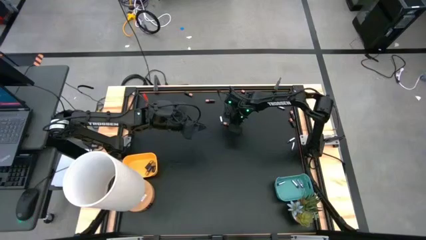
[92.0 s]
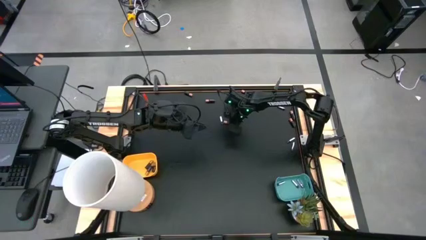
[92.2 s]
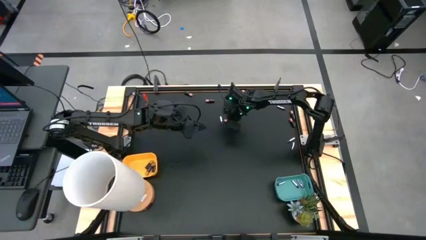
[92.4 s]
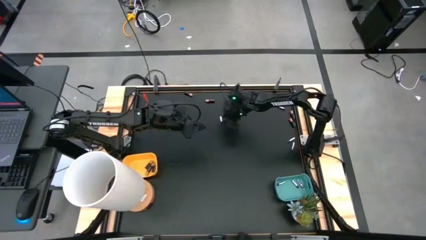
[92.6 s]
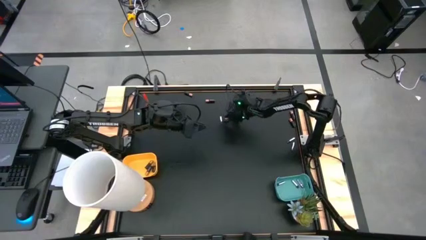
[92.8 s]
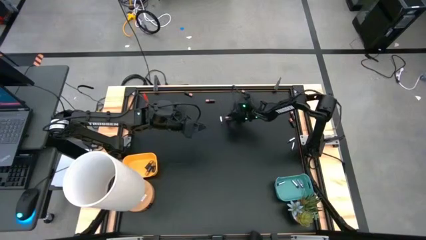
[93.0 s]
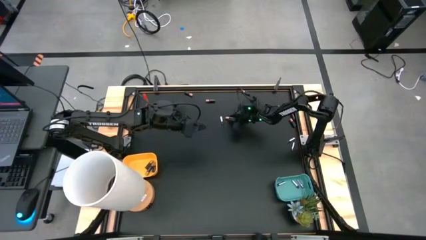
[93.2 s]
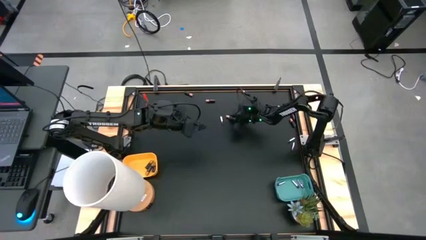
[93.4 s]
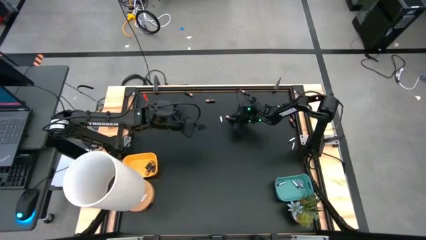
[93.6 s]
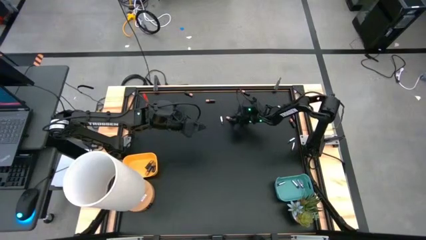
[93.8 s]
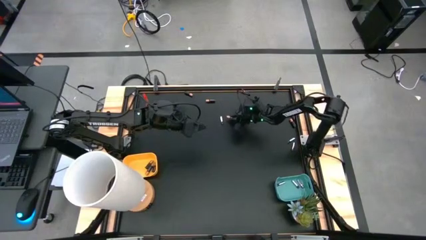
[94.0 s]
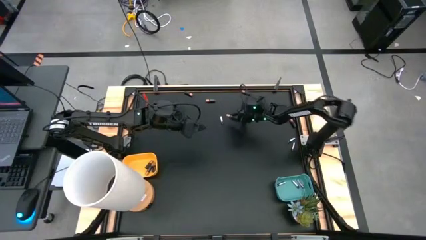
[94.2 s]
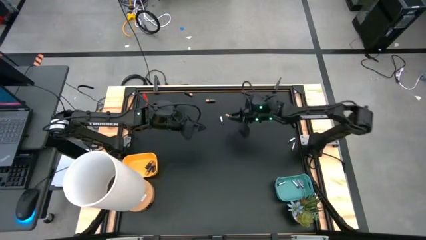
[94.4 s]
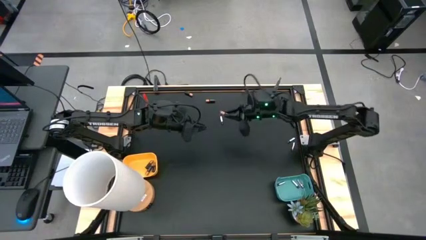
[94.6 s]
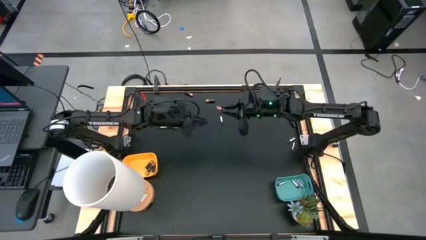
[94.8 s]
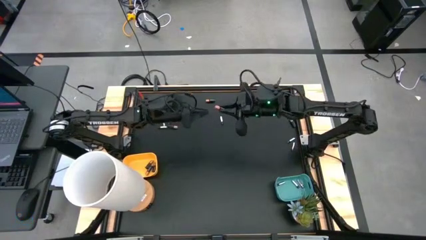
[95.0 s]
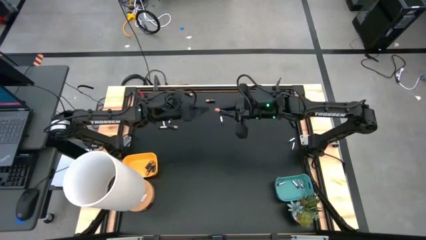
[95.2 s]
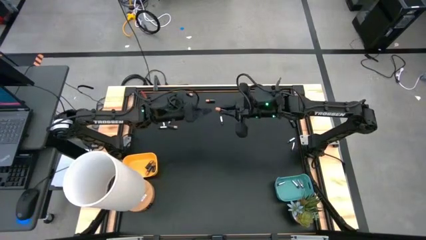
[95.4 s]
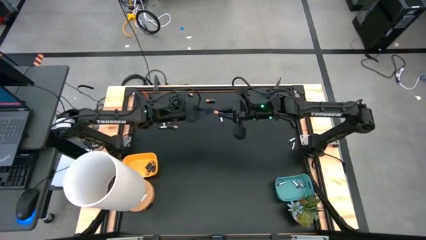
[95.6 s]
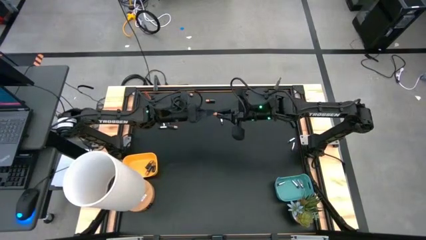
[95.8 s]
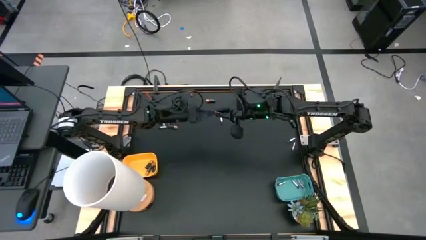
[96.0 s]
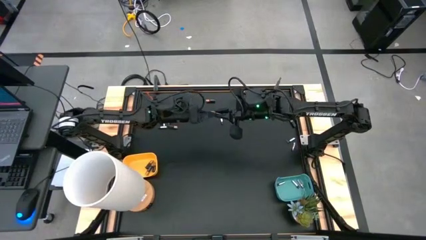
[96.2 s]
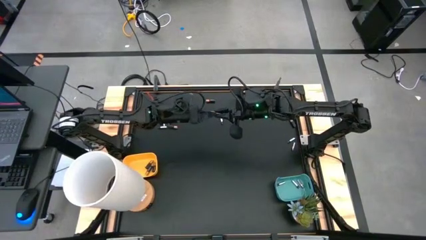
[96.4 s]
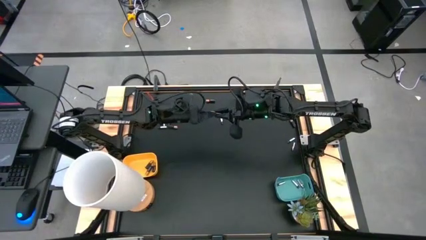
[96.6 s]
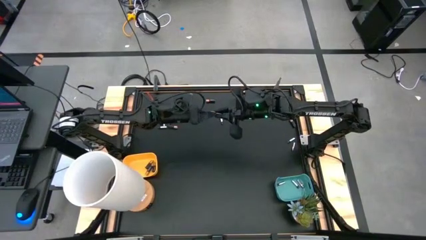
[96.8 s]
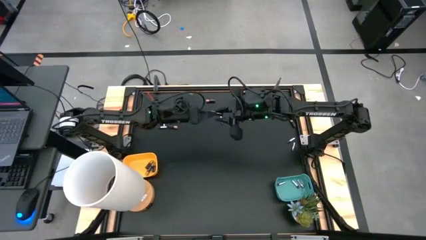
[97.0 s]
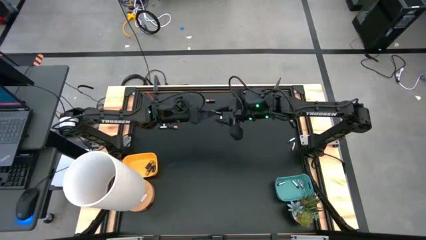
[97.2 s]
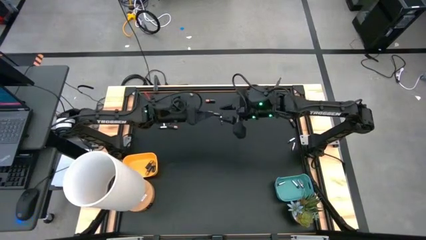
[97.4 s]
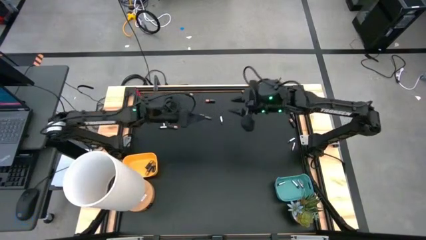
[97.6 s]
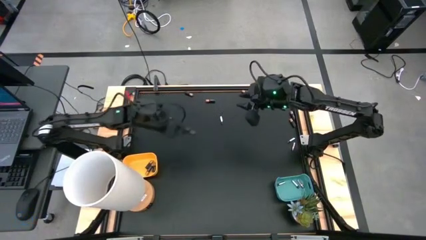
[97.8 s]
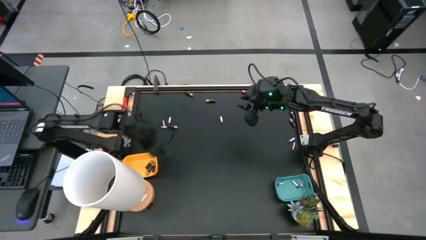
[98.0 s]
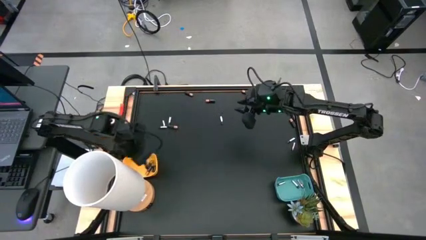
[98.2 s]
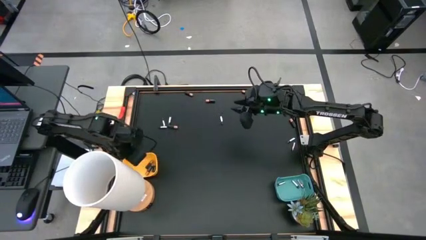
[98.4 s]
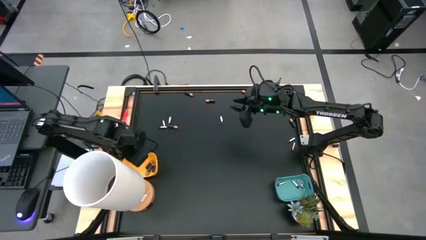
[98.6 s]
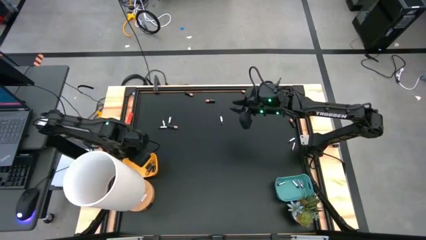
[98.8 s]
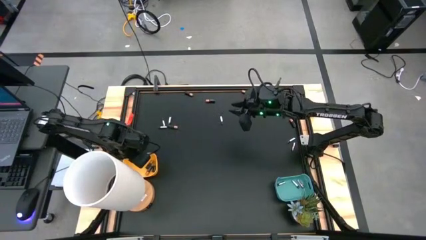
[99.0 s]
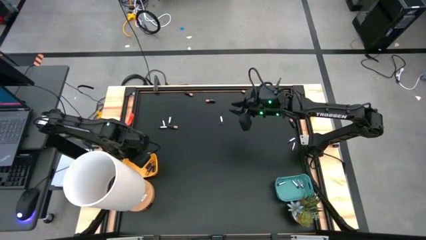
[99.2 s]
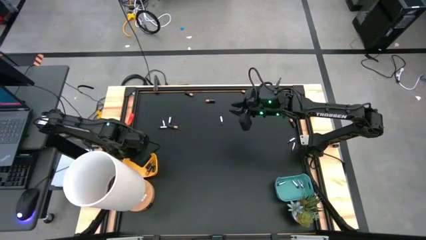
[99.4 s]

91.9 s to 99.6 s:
Task: Sort batteries
Put the black battery into the yellow bin

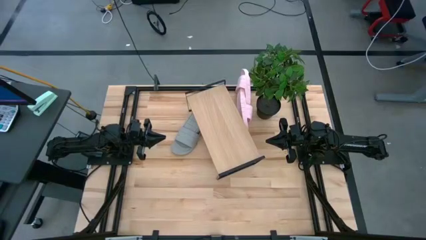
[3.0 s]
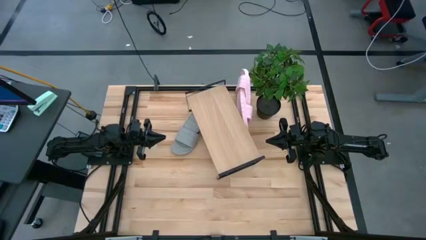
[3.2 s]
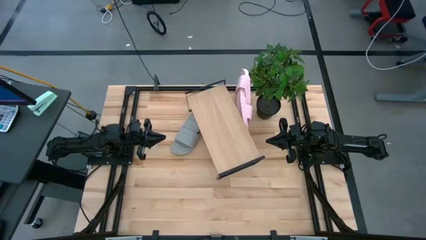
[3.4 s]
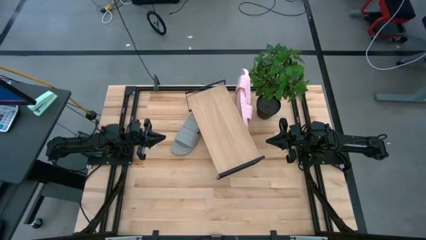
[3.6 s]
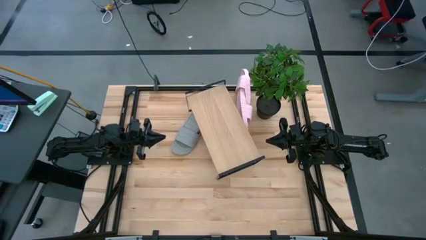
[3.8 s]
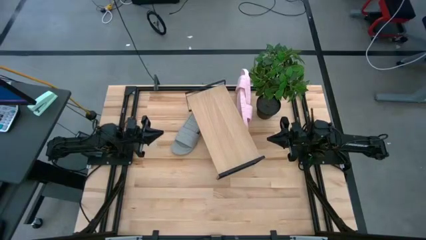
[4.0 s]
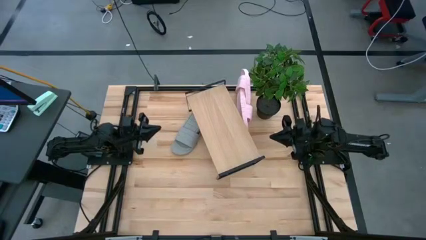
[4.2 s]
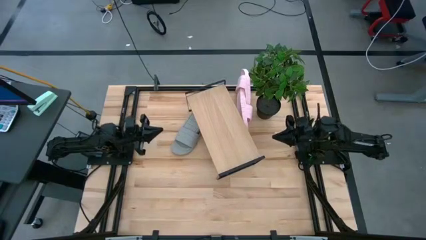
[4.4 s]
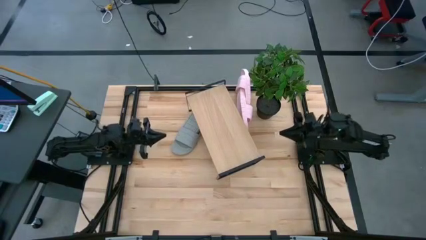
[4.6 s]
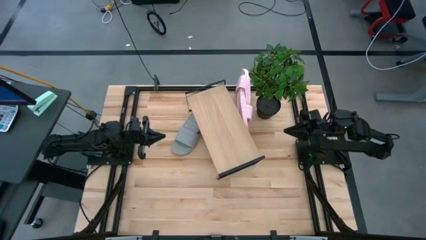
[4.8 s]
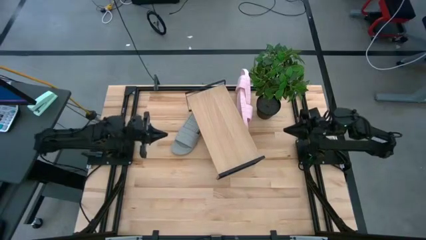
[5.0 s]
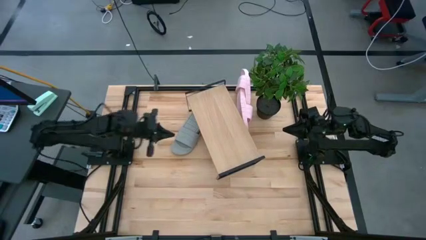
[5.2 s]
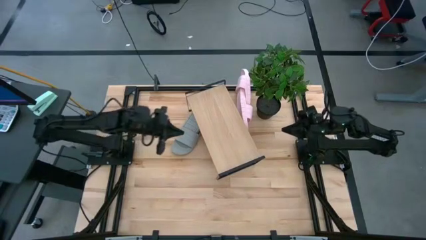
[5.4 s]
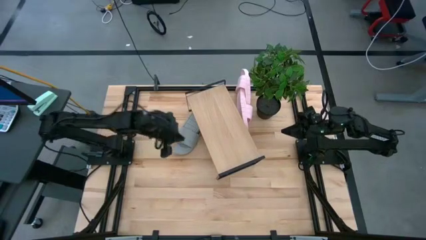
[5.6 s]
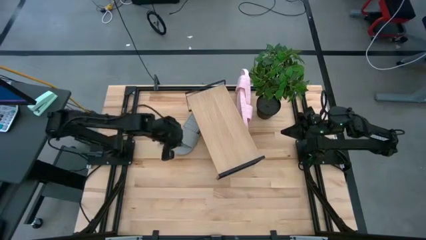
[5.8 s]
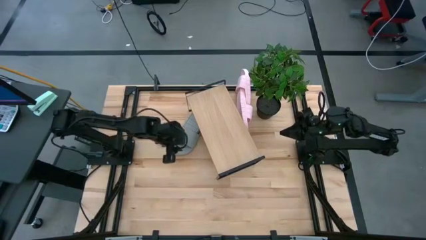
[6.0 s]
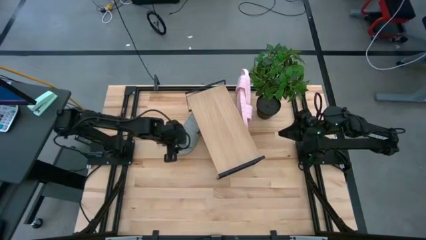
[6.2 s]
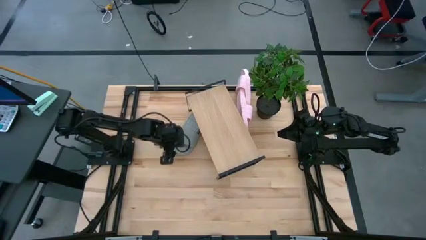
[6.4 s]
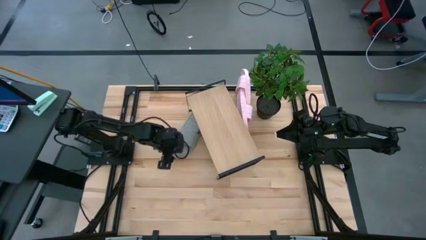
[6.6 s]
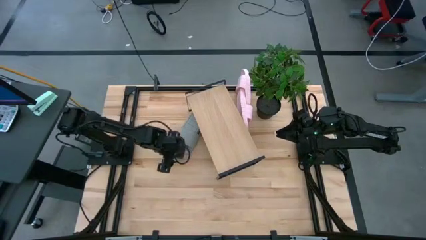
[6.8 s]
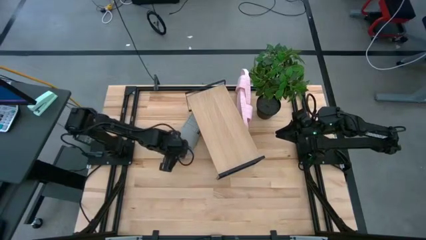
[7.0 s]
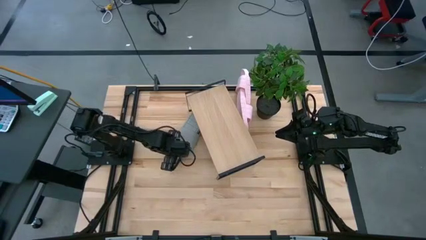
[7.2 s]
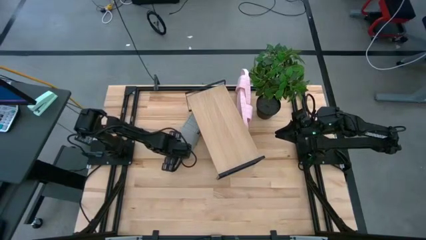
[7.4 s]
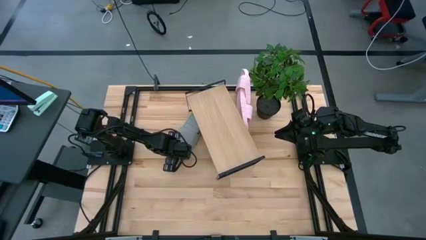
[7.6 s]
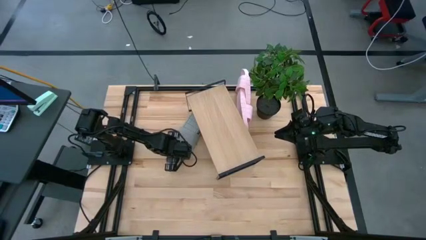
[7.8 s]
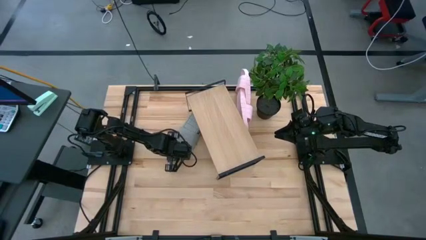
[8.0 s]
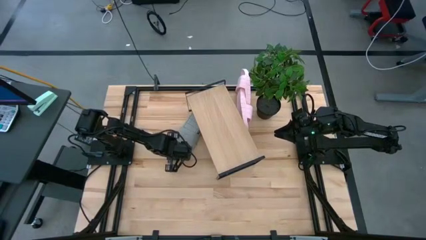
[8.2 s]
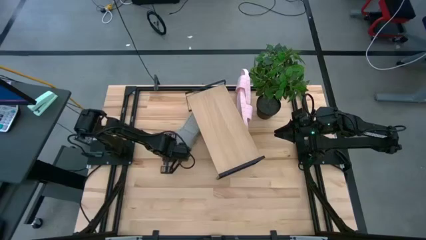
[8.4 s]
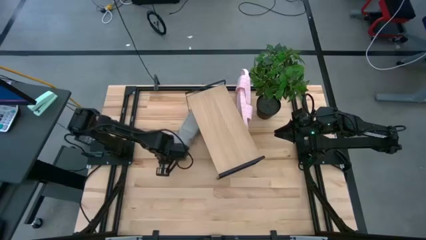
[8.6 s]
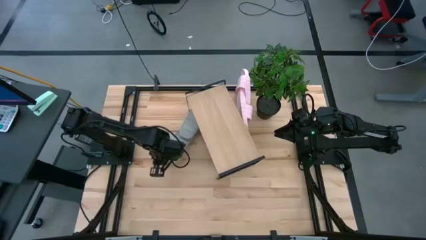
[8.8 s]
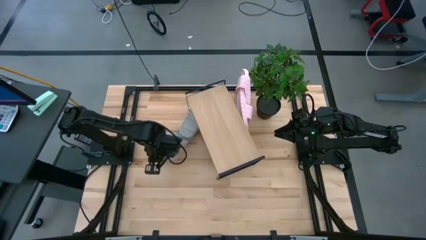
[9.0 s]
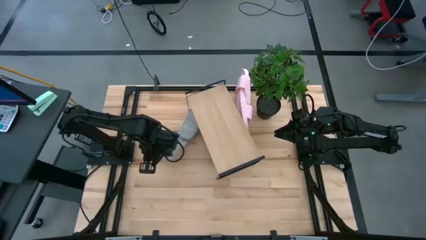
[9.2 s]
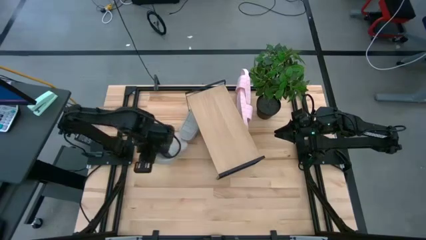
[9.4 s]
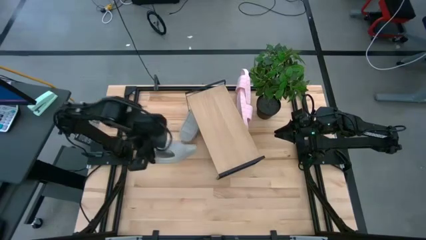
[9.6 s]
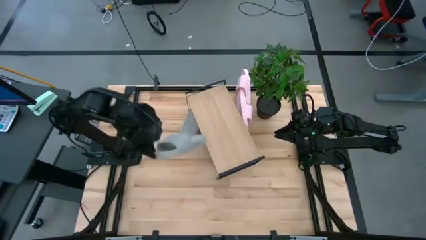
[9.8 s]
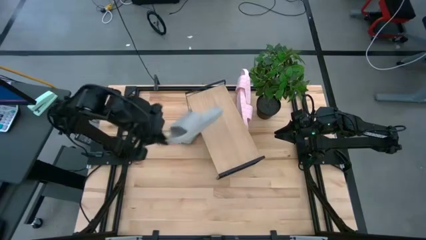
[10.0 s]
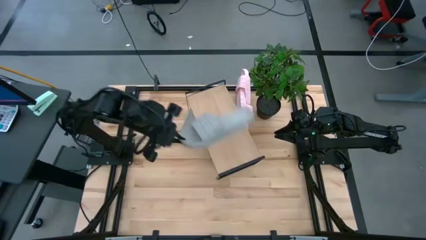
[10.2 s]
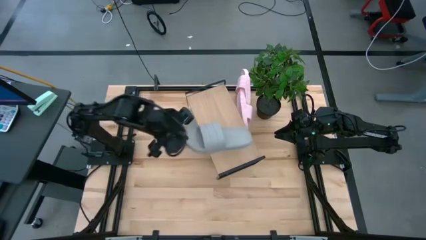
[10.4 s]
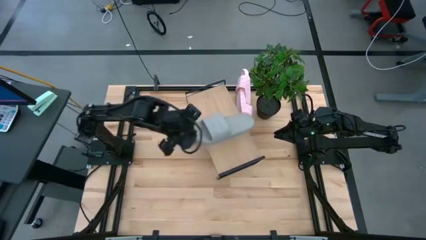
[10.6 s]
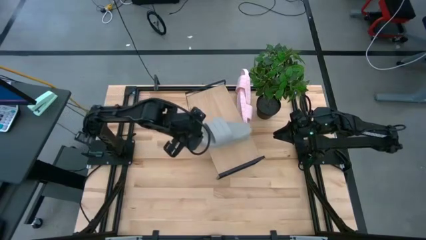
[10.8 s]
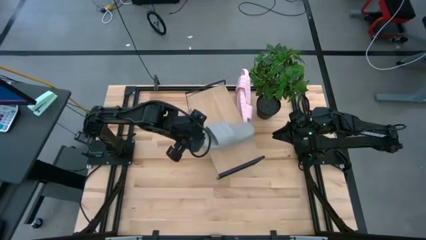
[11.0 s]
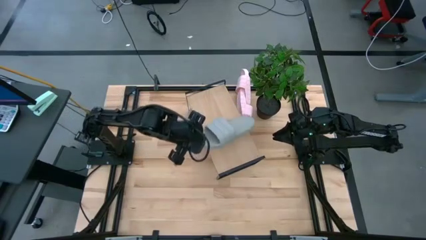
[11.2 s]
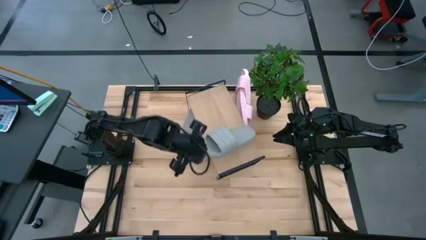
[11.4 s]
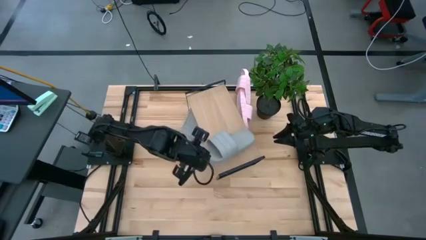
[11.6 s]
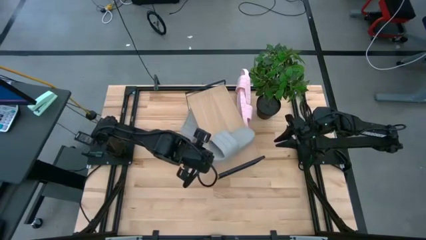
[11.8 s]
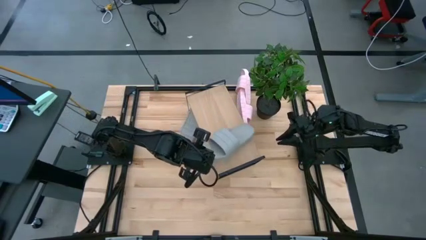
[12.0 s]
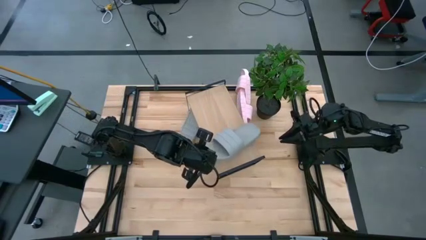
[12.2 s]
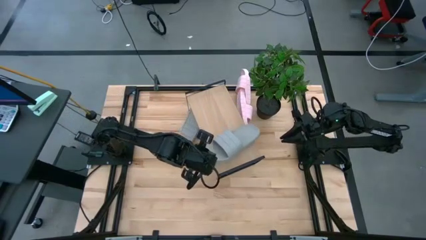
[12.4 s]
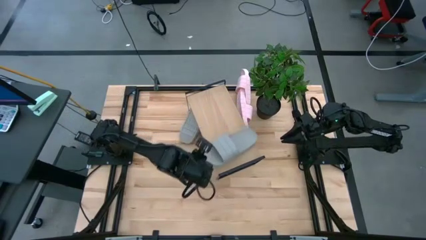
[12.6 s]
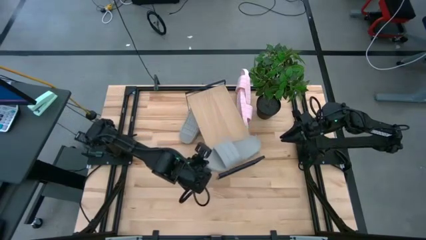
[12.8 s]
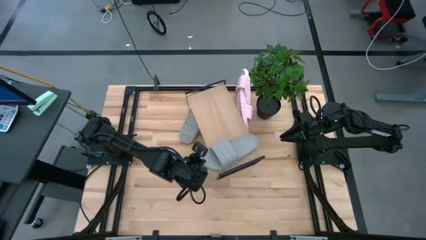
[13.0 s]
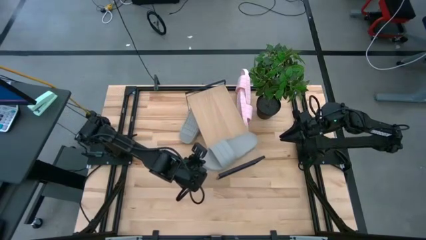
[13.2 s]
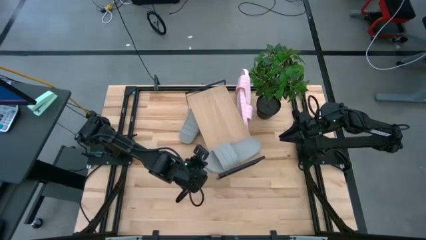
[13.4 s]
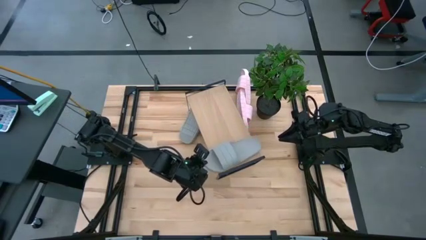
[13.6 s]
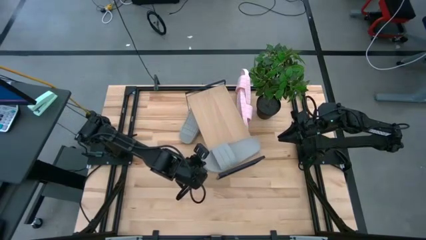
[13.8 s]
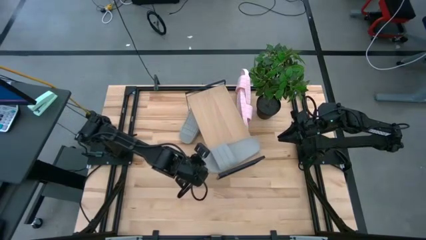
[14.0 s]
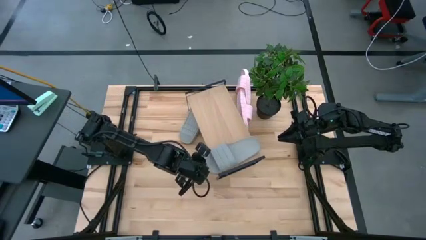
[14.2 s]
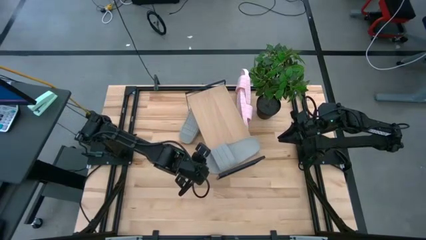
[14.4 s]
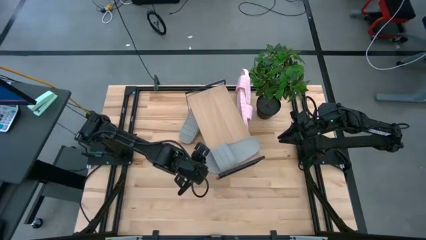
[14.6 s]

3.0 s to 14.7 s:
Task: Pick and place slides into the shelf
Put the bottom gray slipper on the shelf
